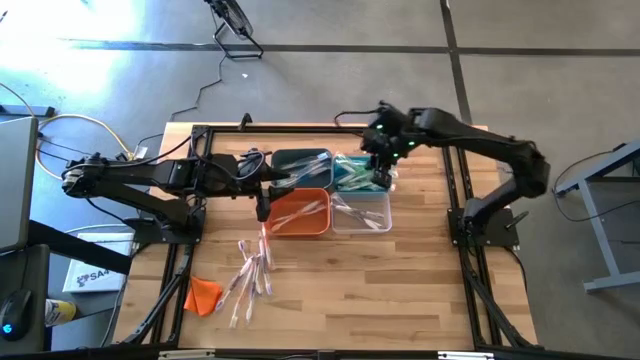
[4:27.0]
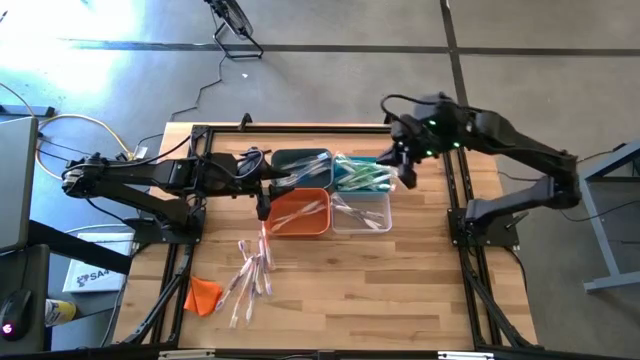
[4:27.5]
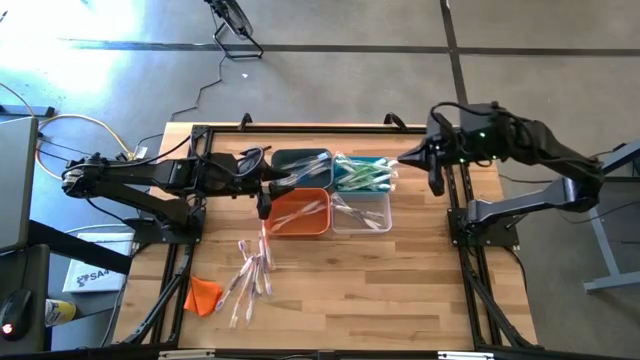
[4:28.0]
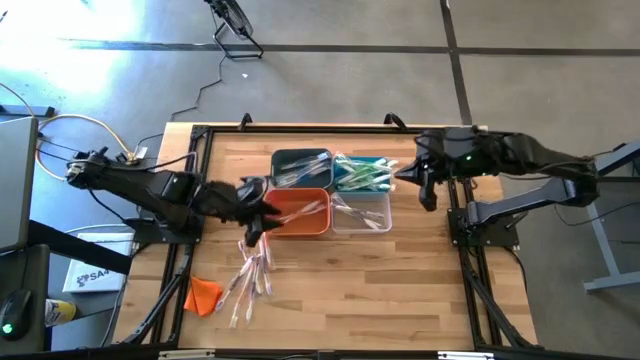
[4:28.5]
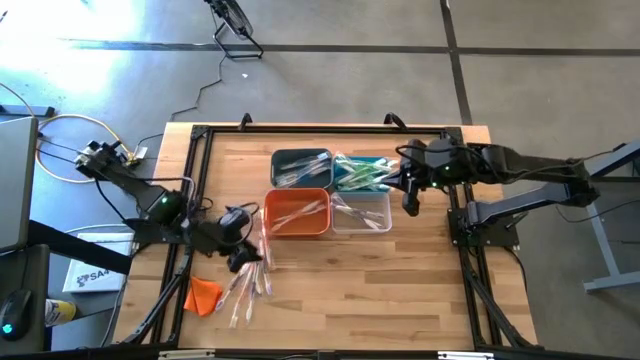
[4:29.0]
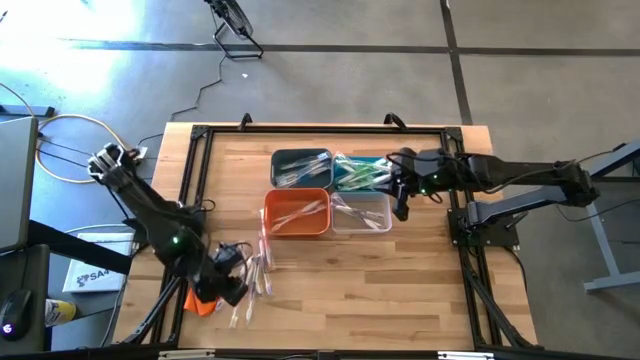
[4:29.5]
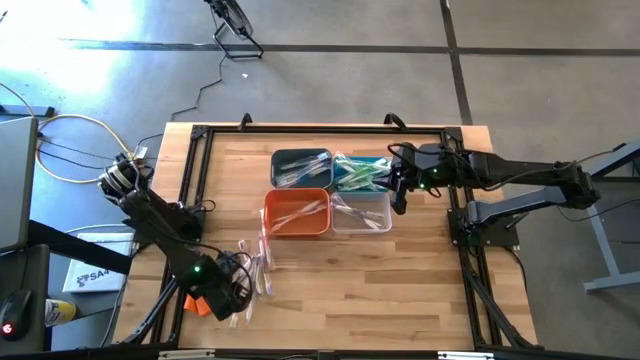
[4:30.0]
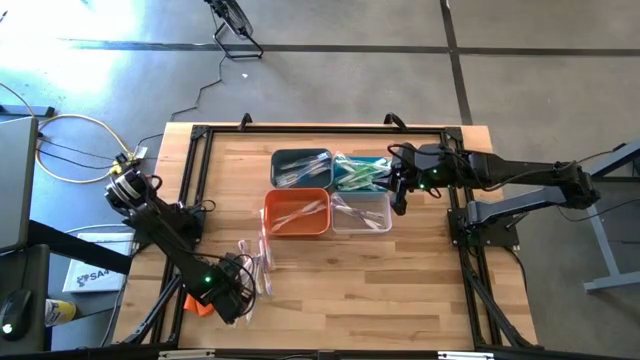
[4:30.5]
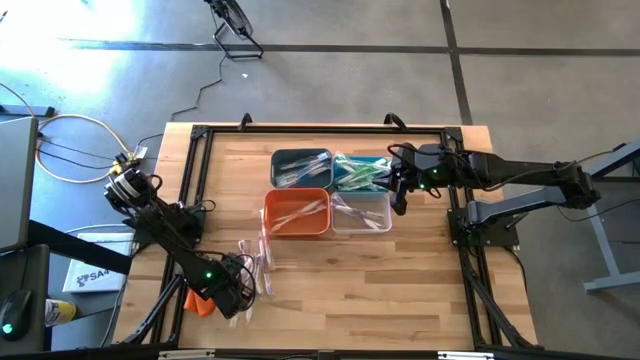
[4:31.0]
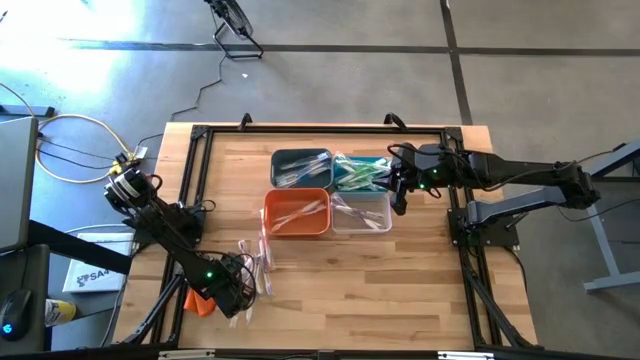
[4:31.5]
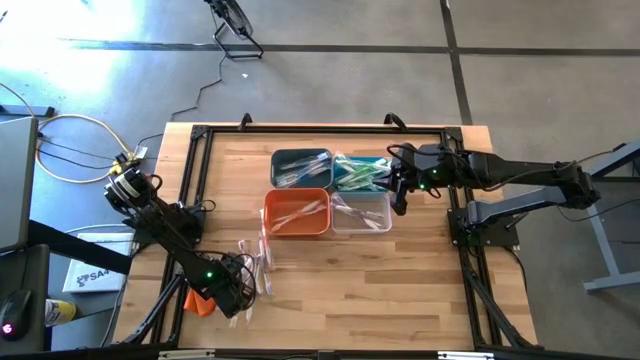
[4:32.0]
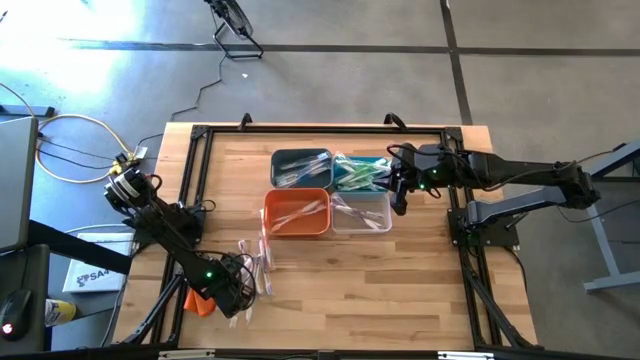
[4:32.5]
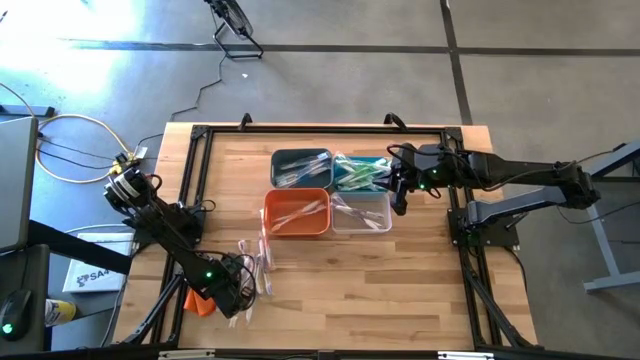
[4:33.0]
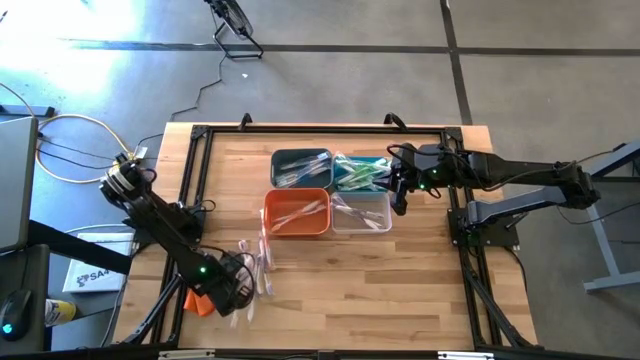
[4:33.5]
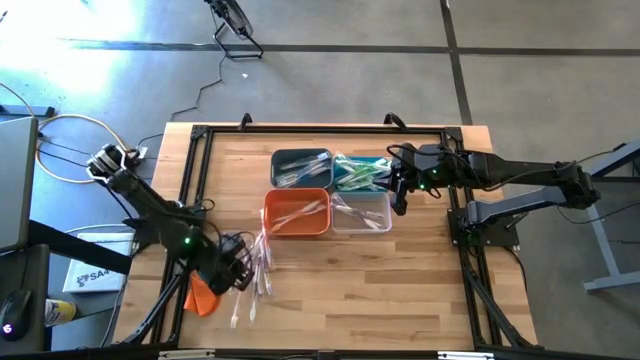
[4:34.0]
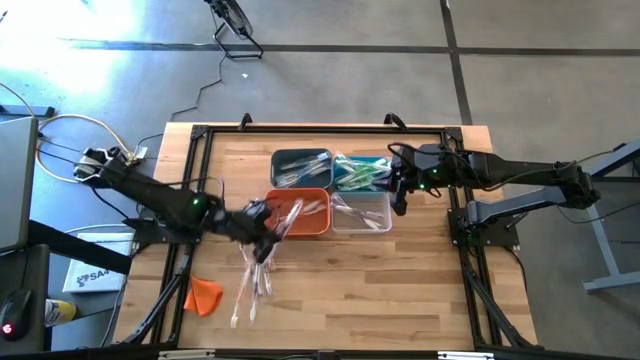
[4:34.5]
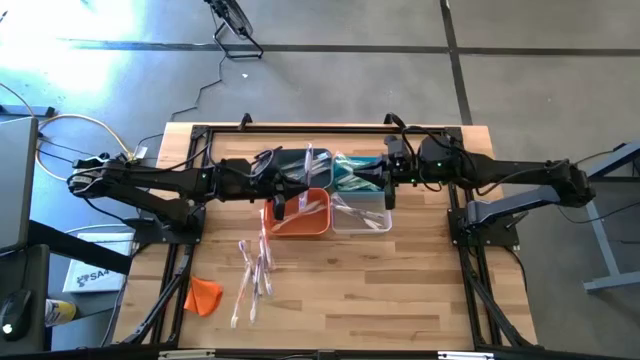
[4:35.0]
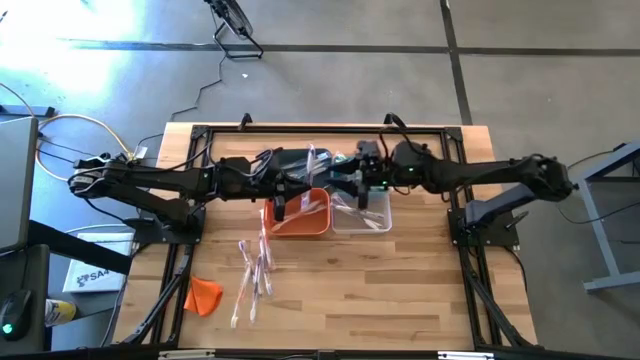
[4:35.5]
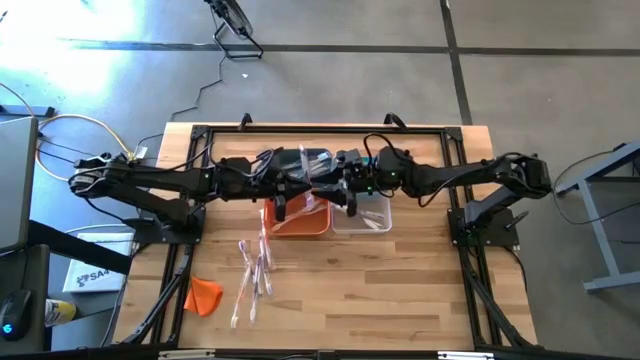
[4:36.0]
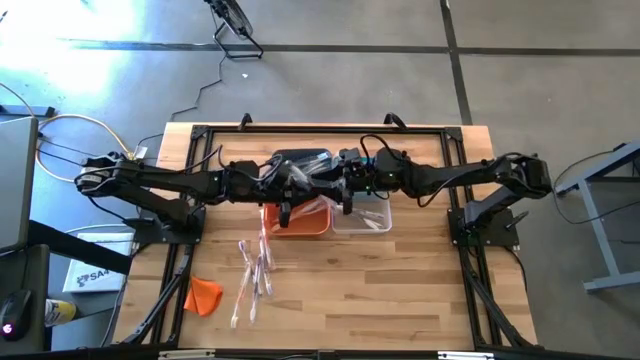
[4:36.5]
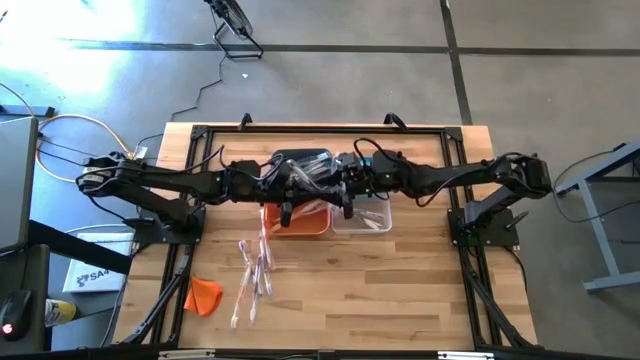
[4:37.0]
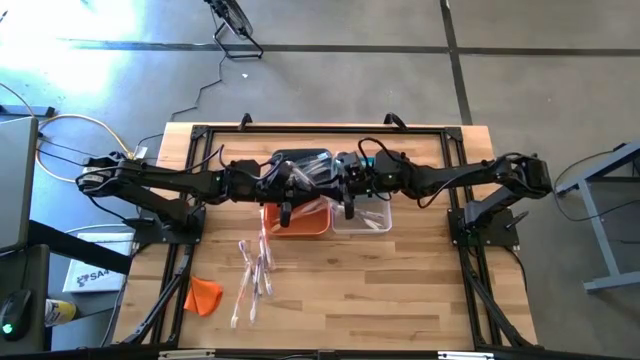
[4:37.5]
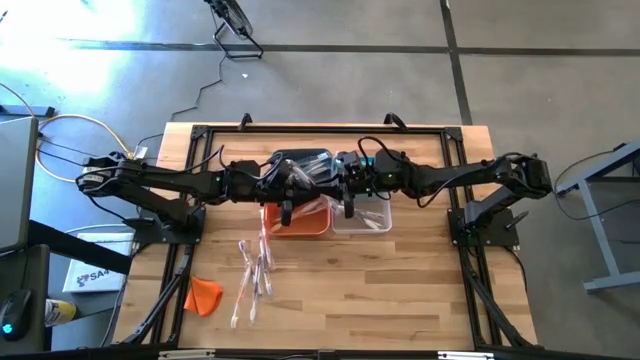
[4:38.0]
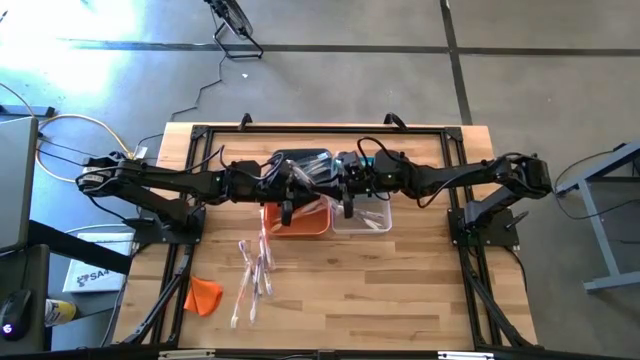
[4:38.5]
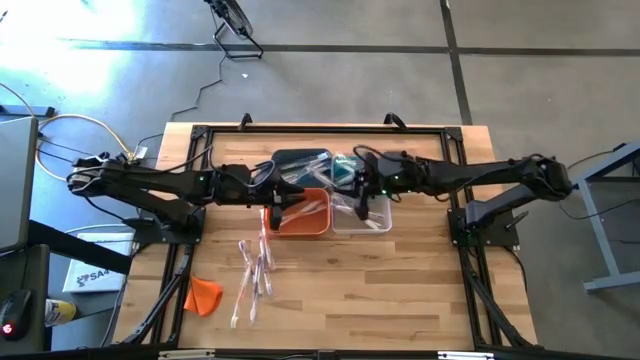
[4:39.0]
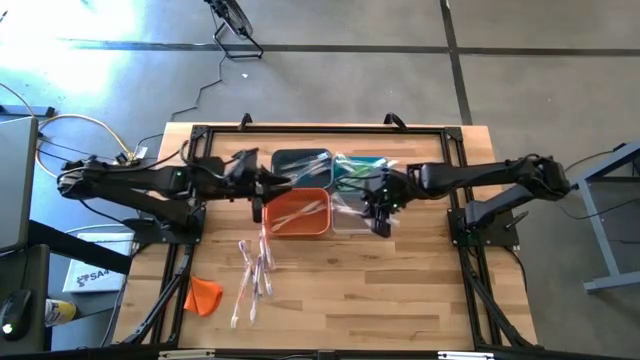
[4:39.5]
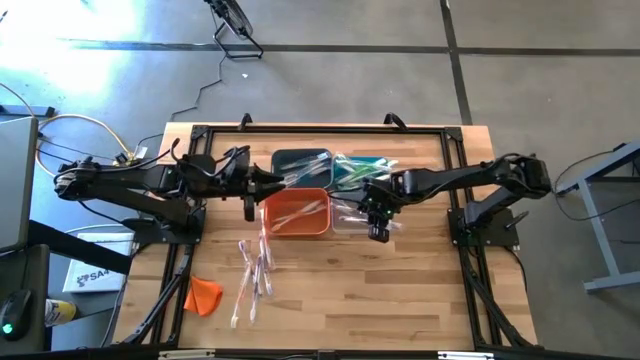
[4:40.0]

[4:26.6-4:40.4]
Task: Pick & Place Toothbrushes
Put the purple toothbrush into the transparent bin

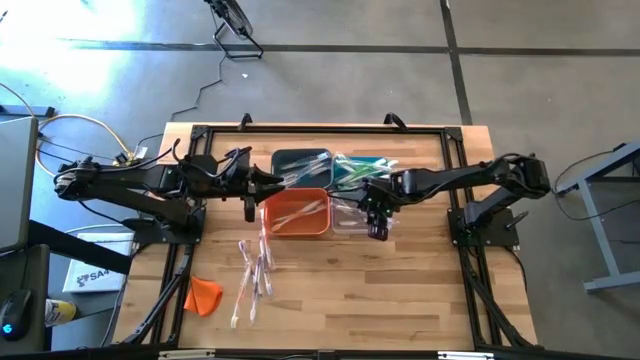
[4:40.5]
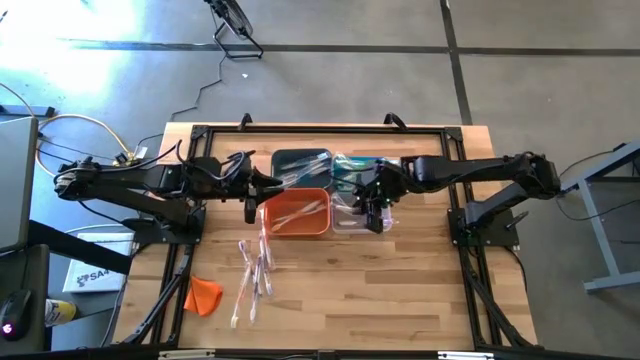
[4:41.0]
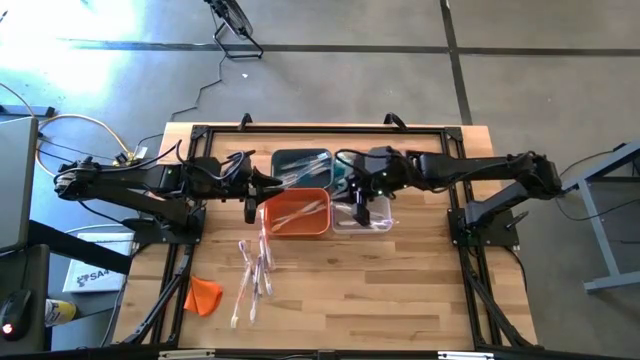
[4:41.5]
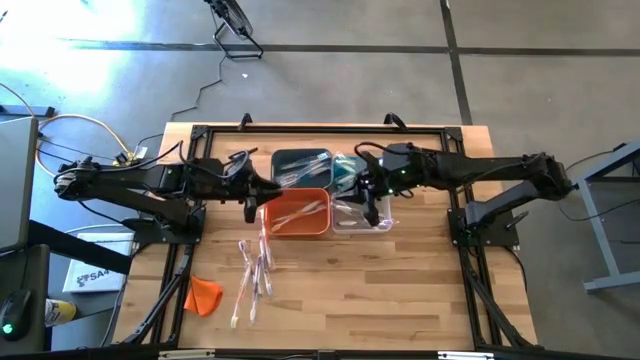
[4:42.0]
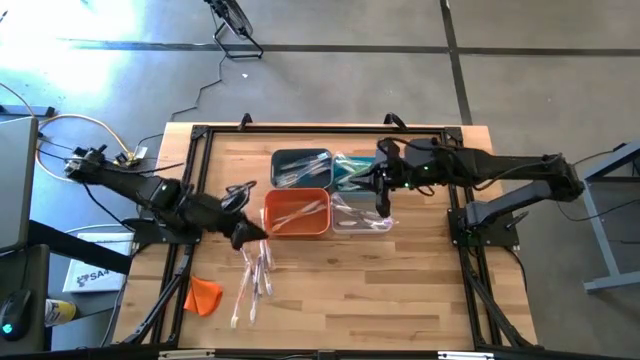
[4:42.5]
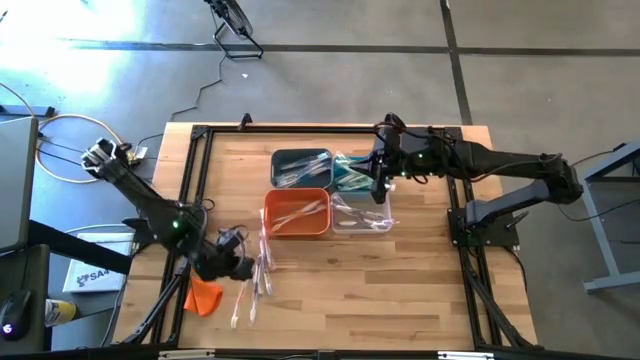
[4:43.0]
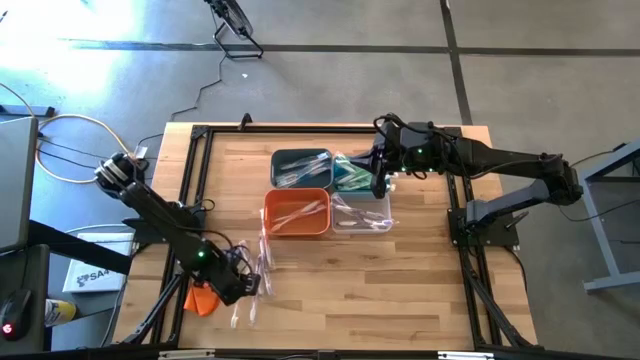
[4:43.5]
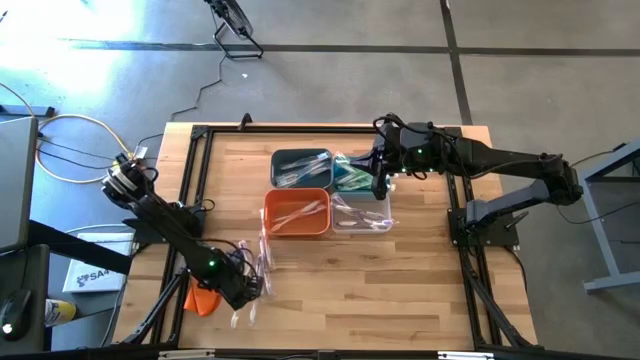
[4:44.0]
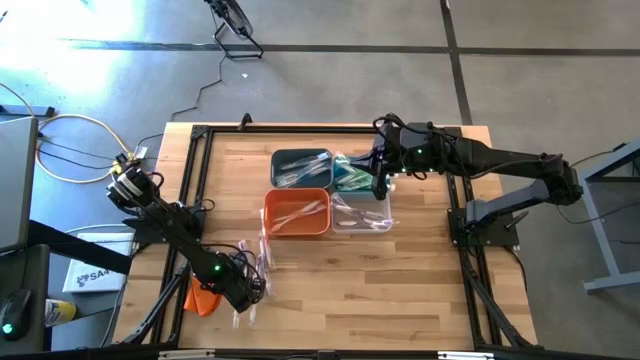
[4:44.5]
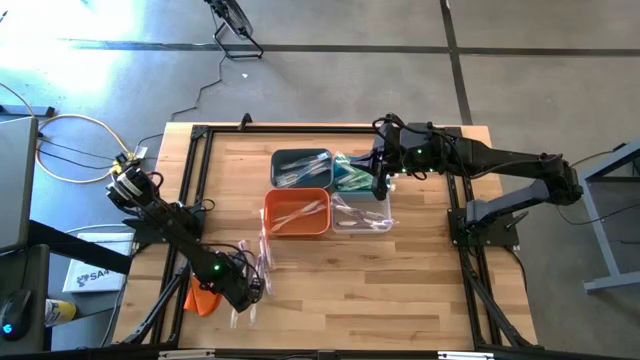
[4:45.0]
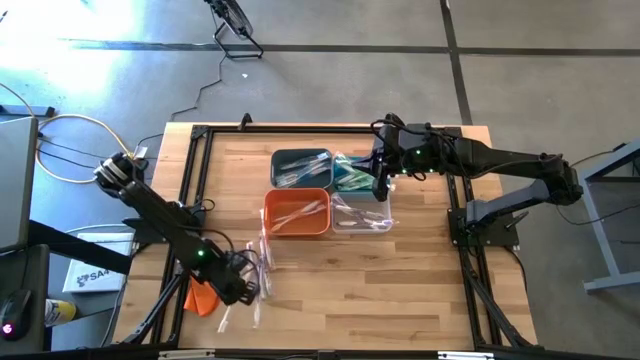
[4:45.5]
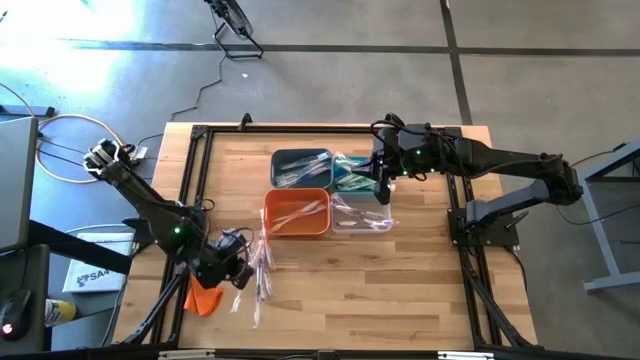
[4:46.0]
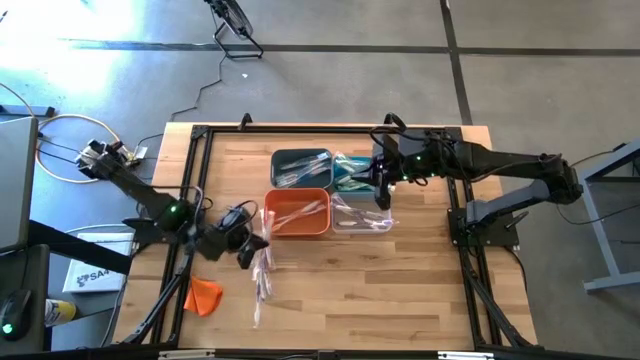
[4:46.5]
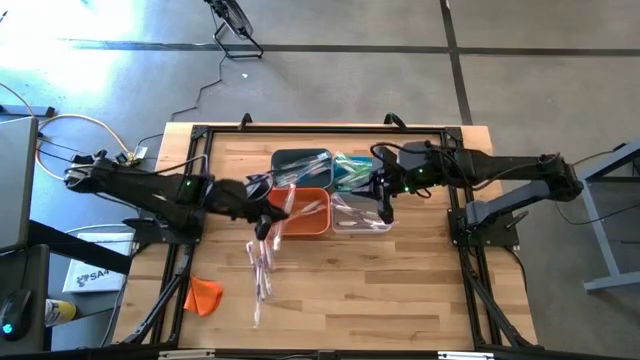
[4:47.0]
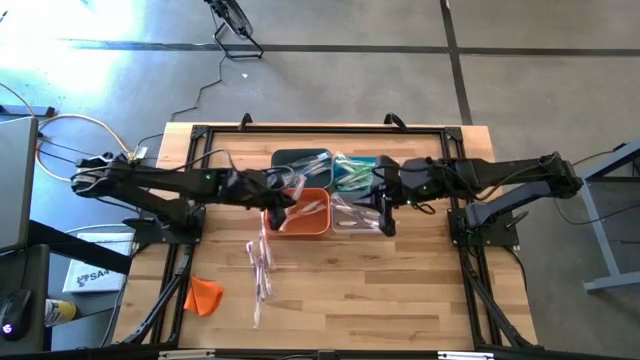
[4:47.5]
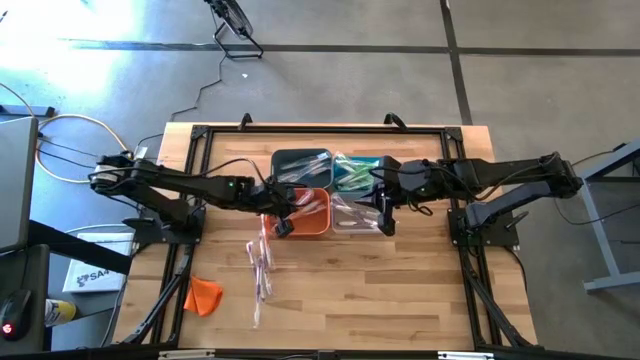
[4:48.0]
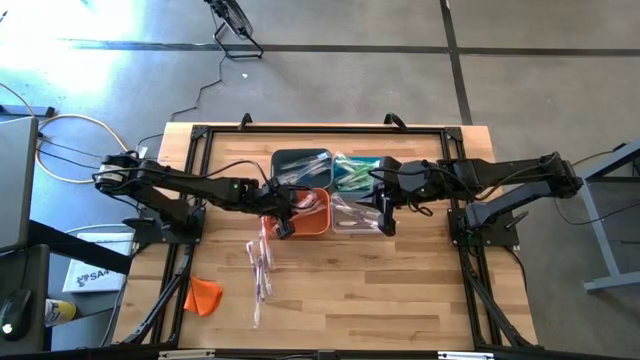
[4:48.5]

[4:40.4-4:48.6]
Put the orange toothbrush into the orange bin
